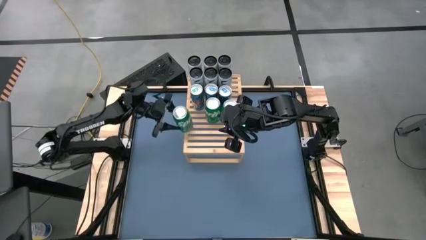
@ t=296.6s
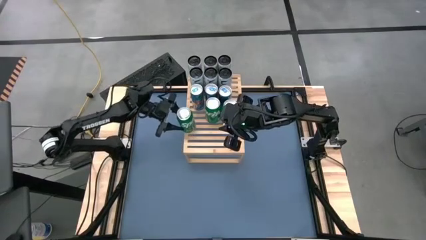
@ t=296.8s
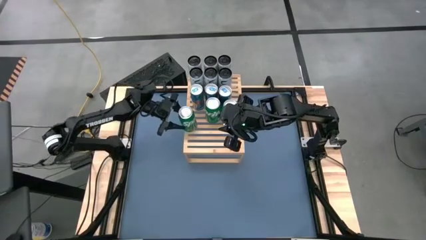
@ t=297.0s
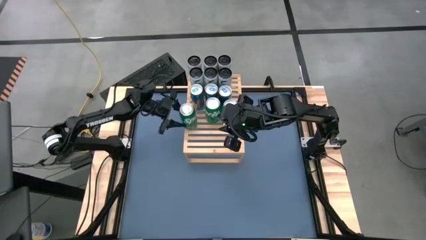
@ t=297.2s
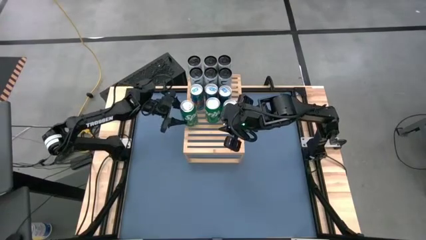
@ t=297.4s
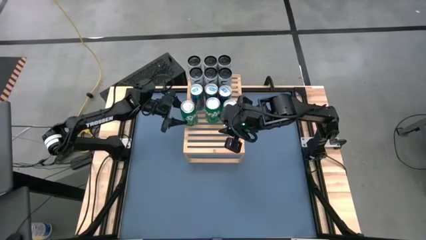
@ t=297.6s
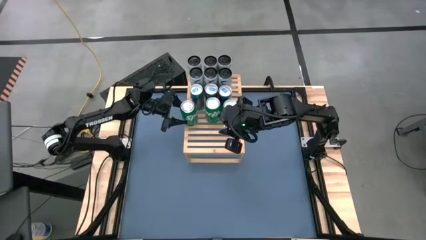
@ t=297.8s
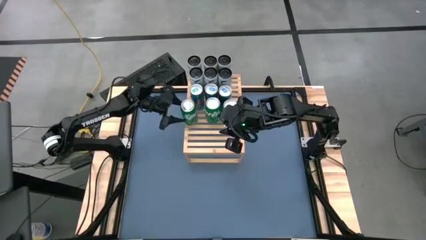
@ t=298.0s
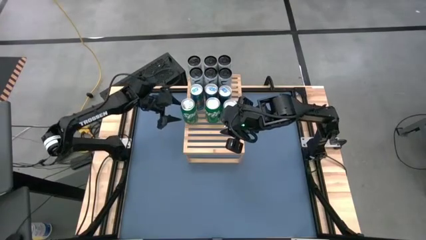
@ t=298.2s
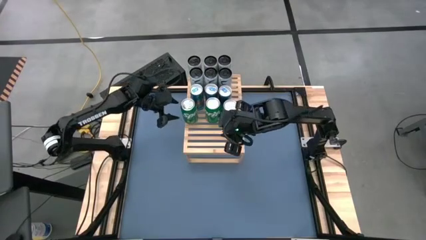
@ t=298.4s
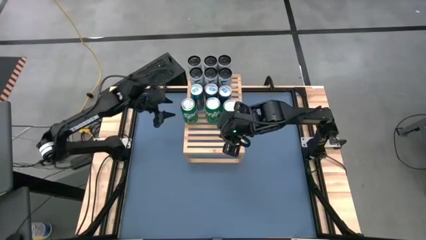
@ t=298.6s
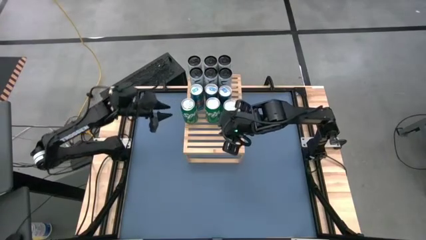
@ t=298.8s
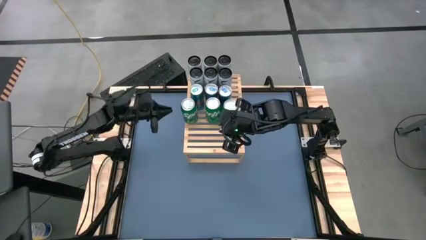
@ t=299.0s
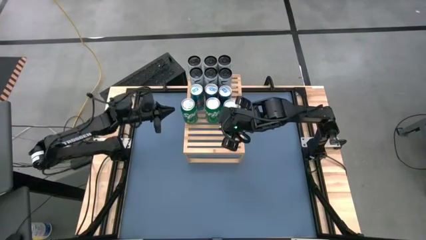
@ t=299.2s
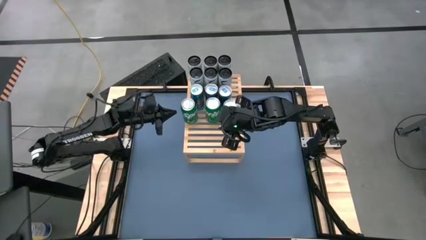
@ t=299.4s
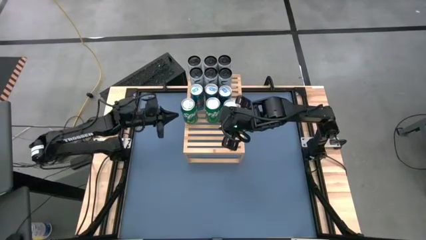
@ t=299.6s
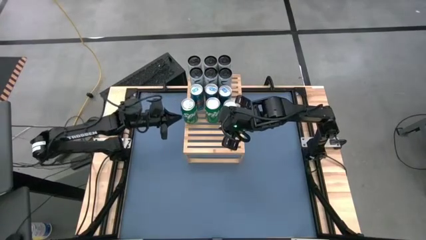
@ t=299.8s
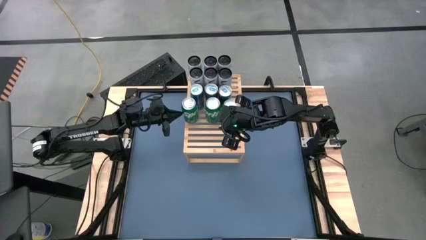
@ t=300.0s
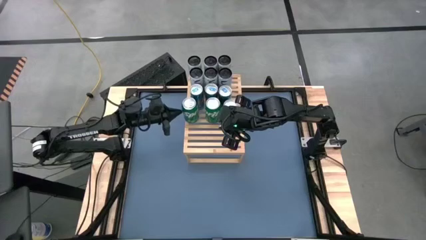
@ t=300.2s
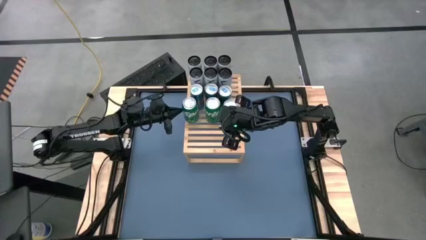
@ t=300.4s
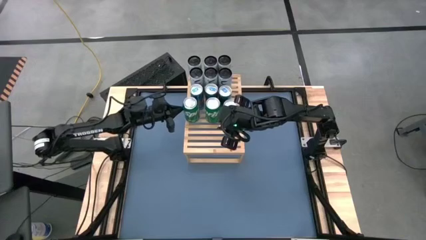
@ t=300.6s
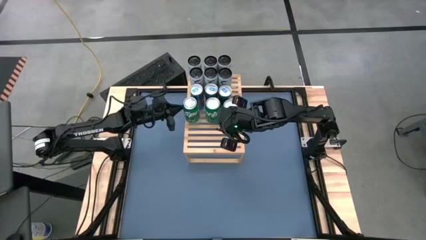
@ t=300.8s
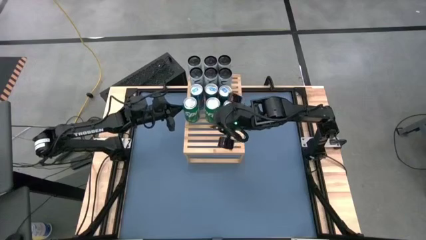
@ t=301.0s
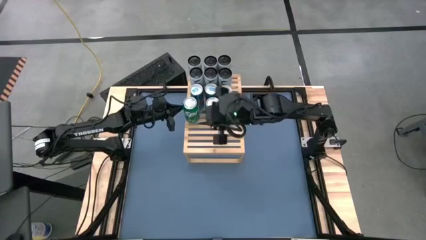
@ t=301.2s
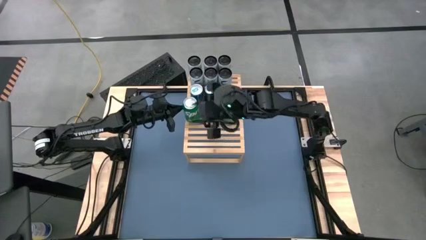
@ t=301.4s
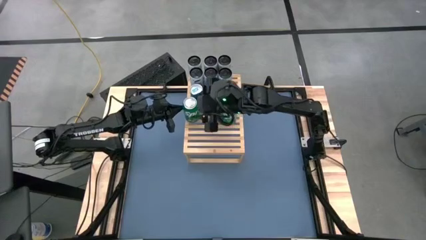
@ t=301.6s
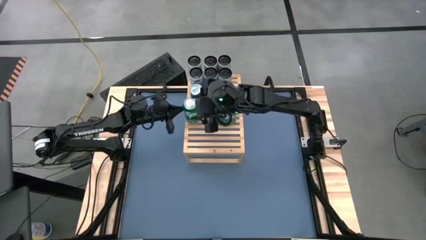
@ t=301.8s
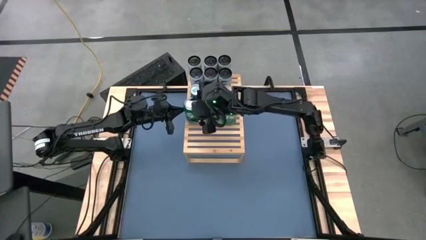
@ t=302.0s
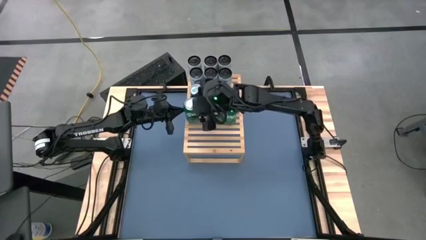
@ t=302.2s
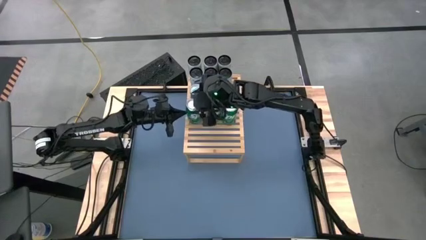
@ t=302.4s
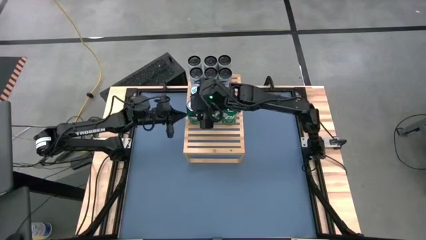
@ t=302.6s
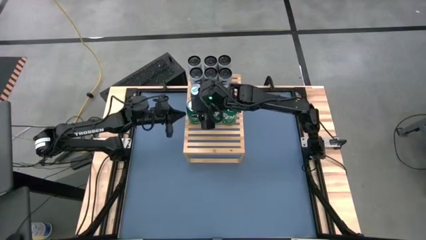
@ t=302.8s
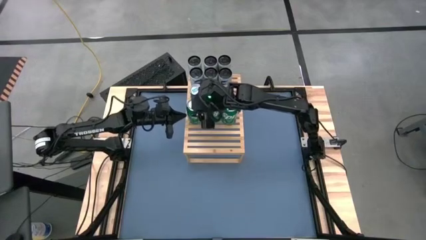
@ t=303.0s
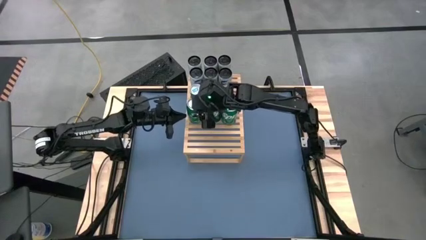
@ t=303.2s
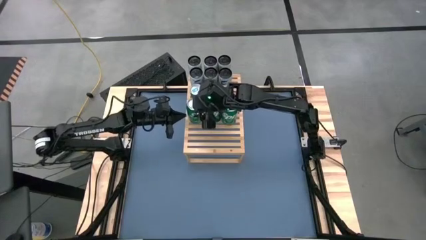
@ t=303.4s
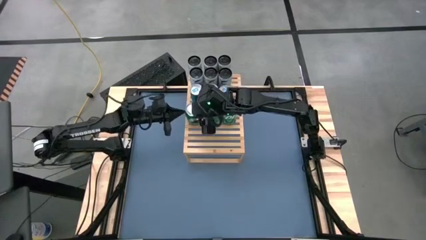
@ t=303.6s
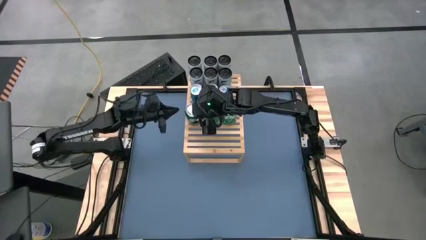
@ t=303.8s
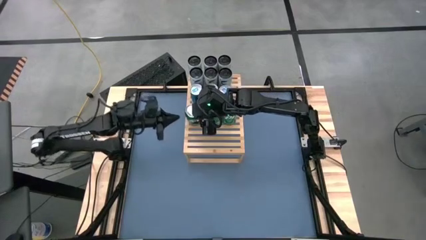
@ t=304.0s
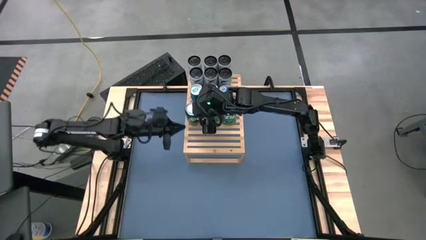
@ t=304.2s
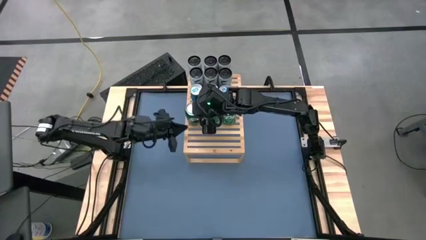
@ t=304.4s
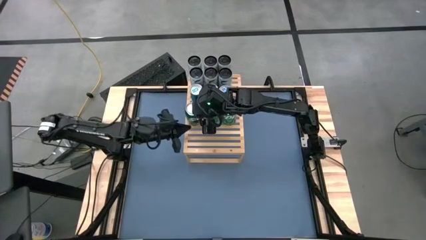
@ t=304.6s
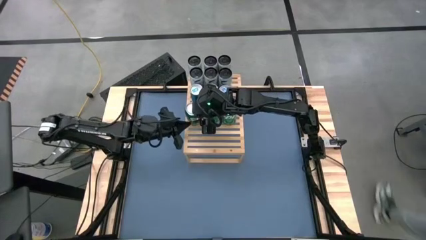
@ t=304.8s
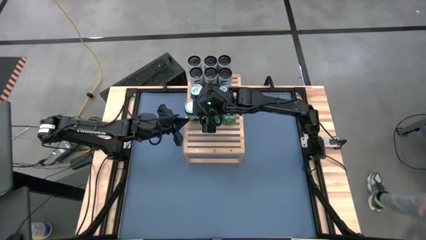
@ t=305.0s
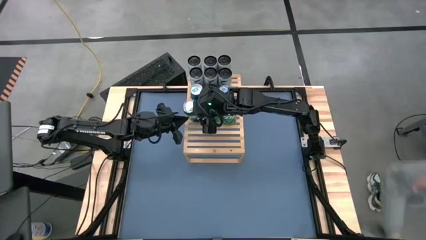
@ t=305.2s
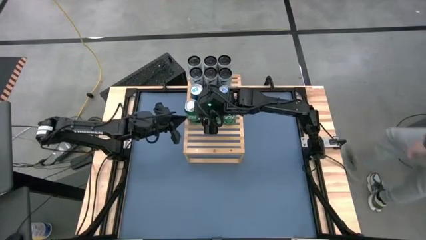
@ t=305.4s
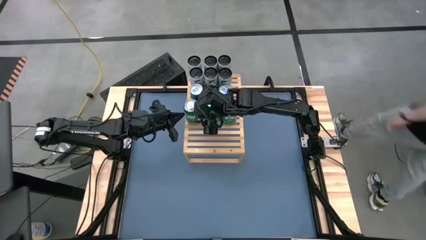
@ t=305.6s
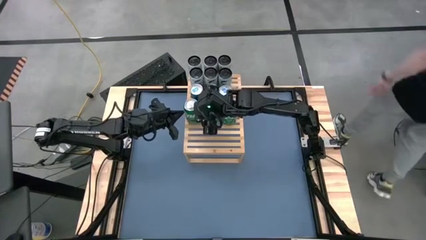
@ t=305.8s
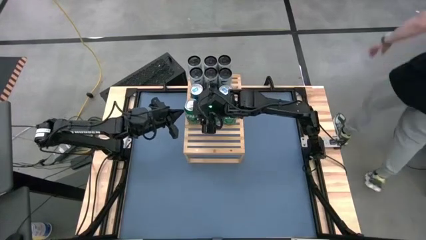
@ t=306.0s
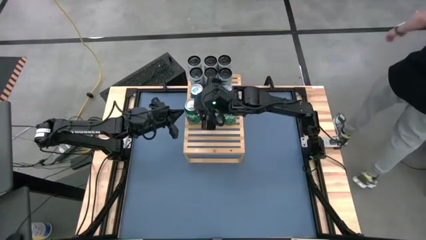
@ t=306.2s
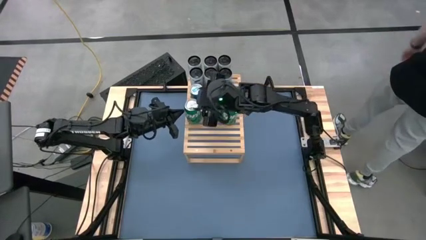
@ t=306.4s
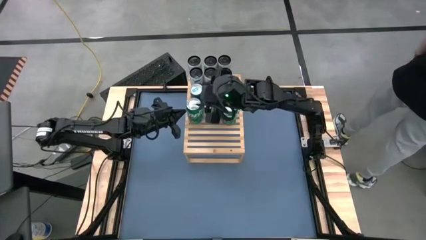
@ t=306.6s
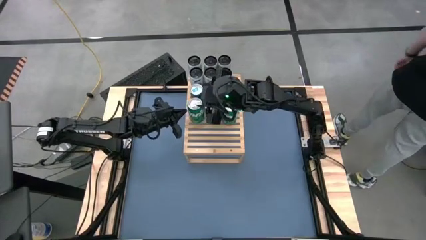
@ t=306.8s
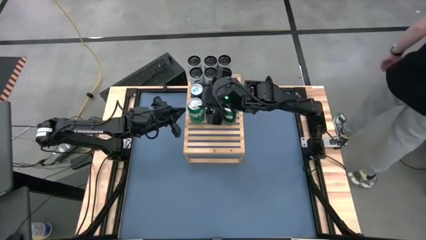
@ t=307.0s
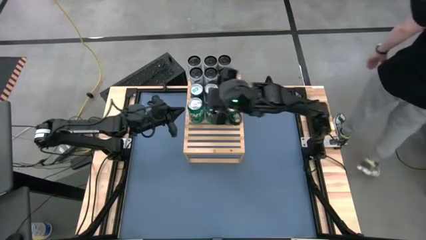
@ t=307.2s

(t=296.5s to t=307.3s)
Task: Place canned beverage on shelf
Put the green soda can on the shelf aligned to the other green soda can
